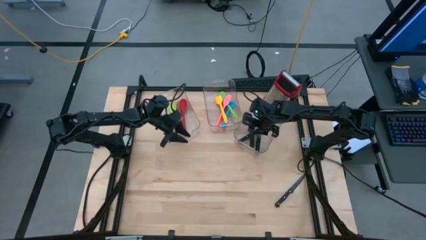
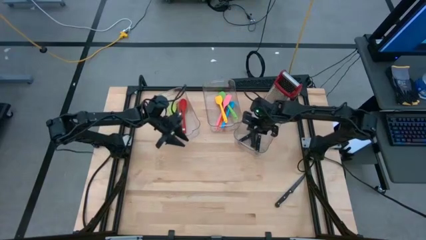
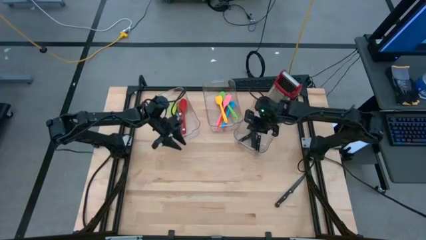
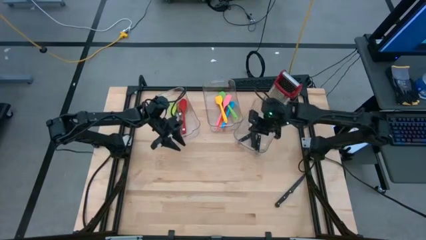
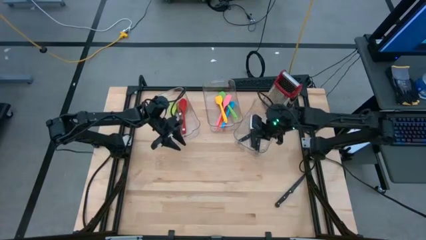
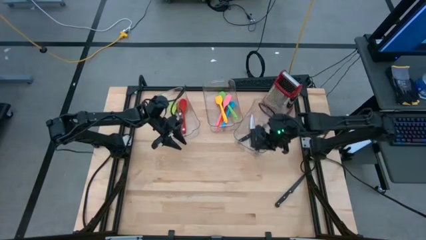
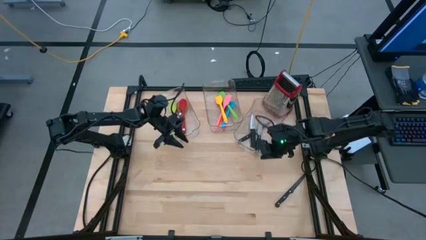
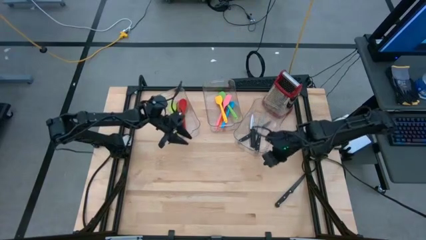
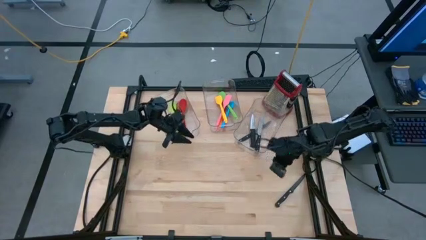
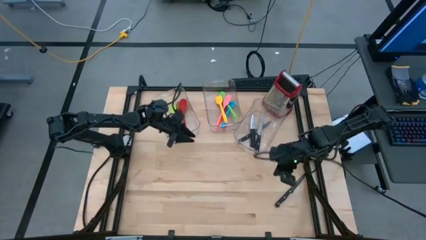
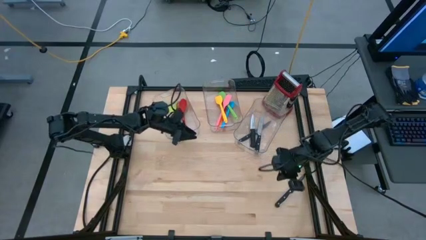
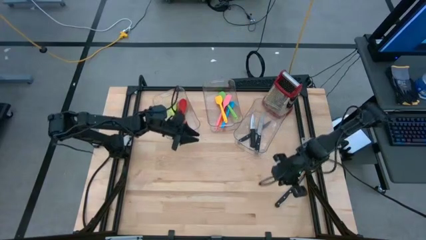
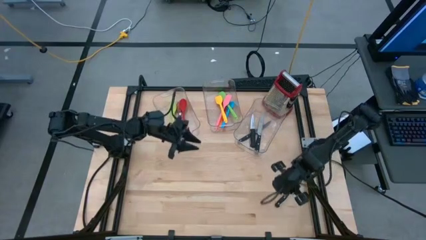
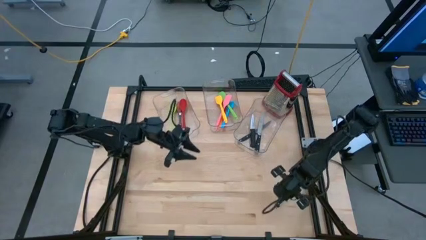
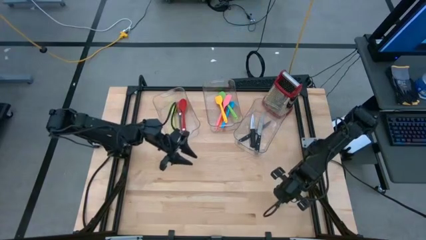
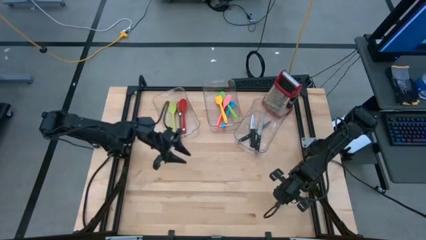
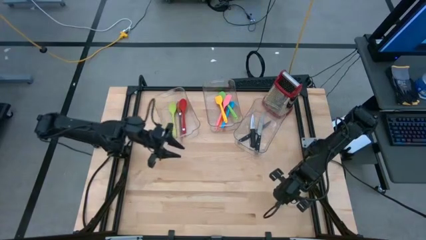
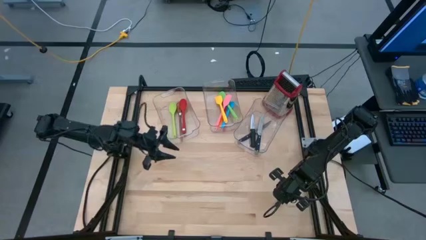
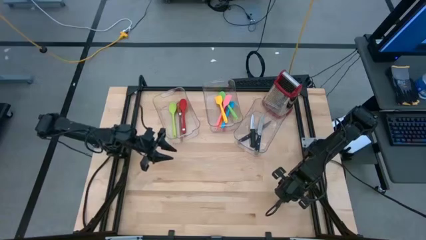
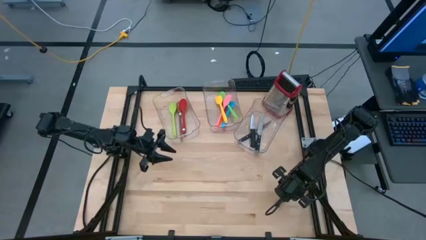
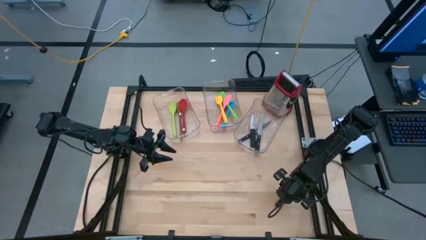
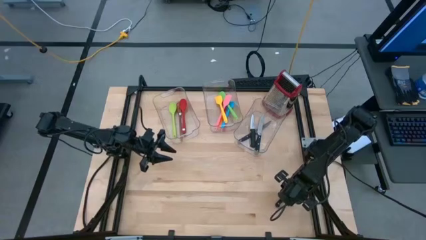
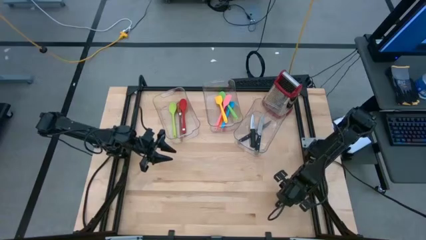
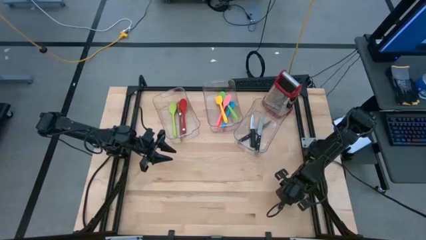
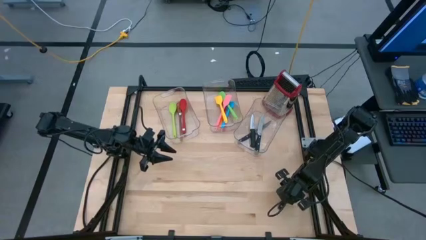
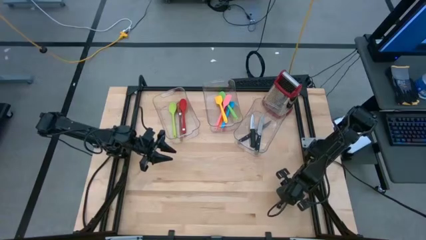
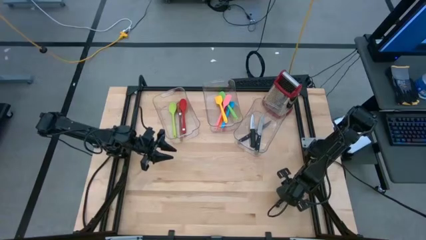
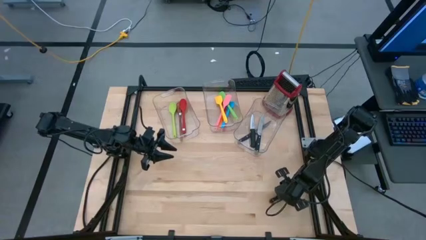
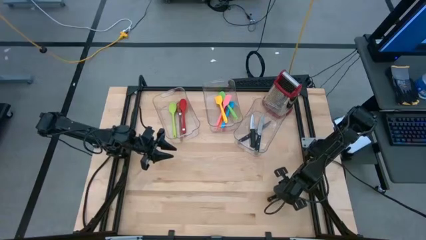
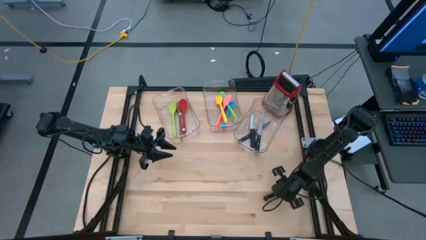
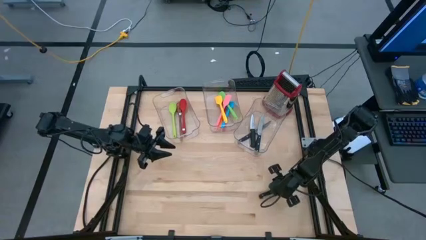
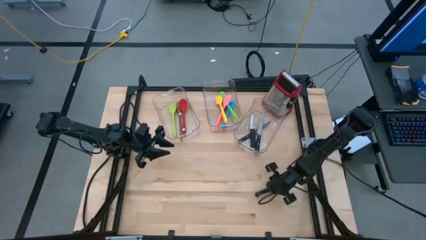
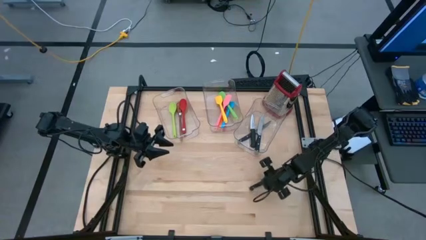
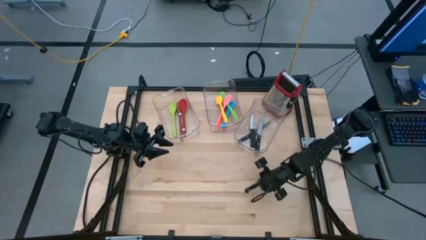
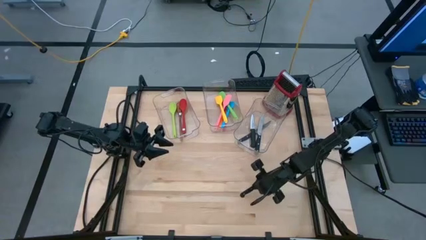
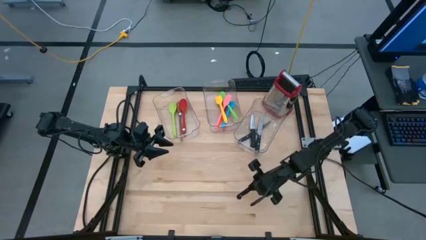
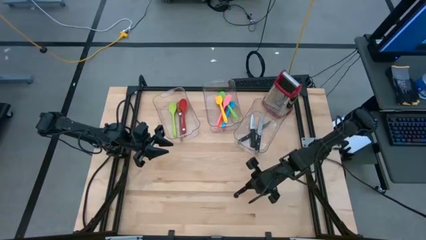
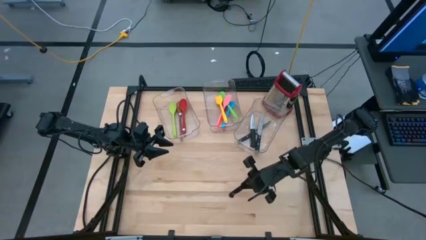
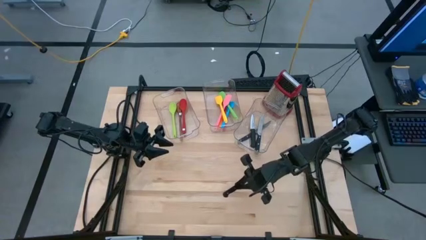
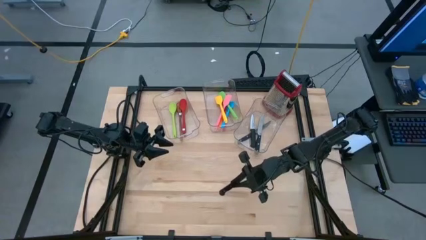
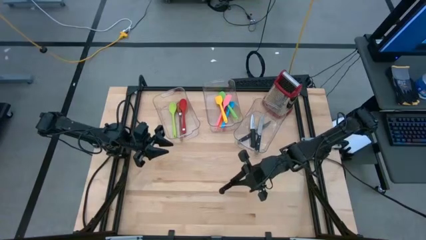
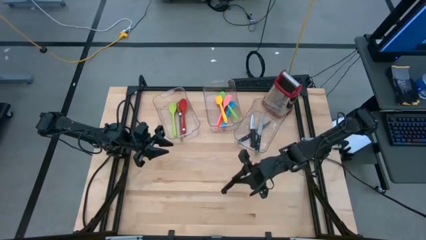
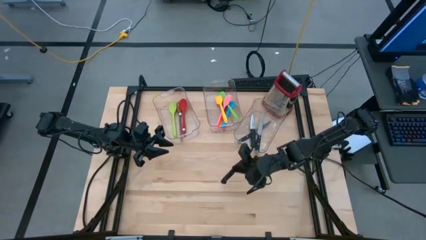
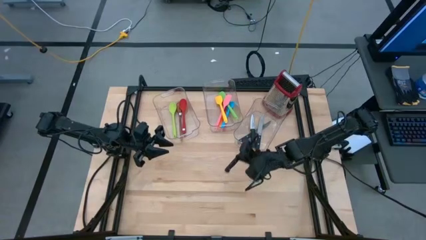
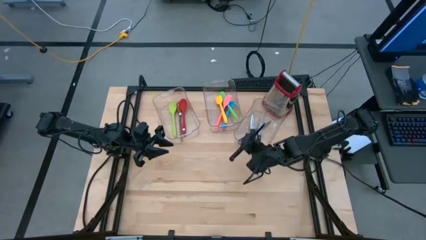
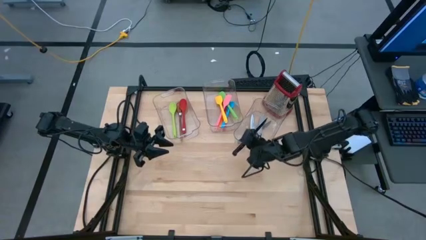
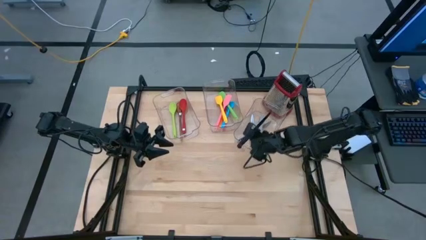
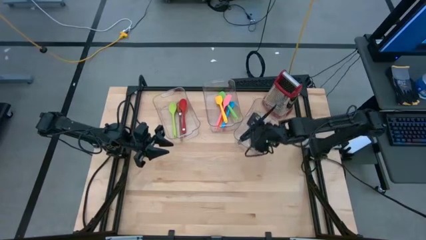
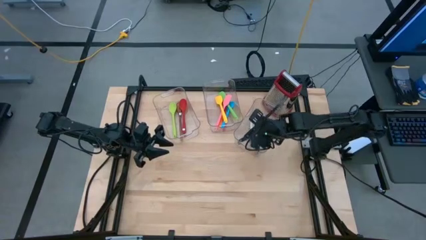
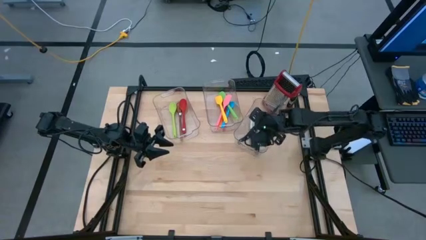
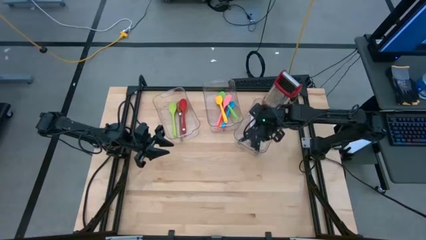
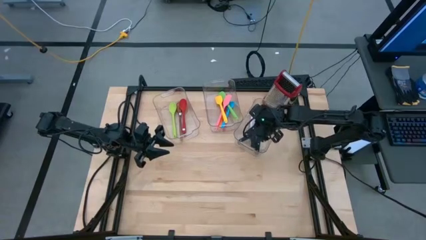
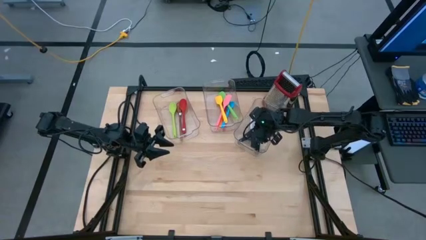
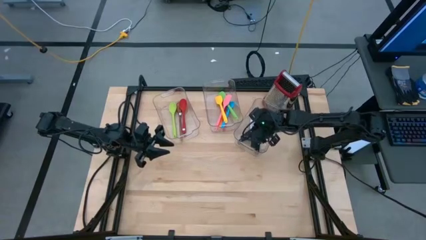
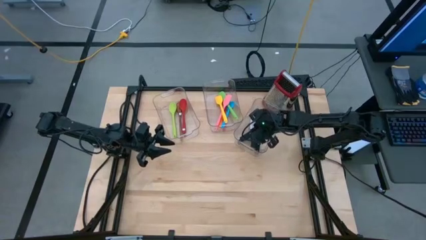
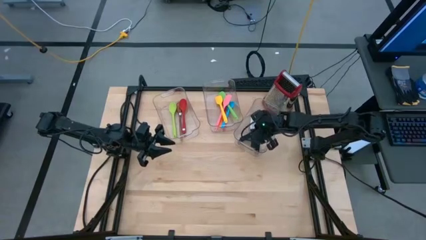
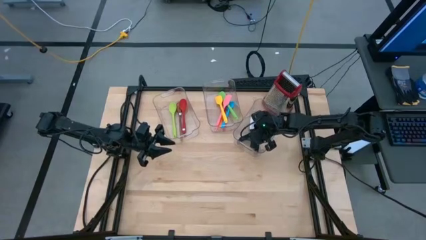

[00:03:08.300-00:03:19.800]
Task: Pick & Place Kitchen Items
Put the black kitchen knife in the right bin

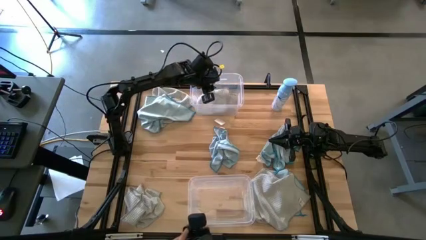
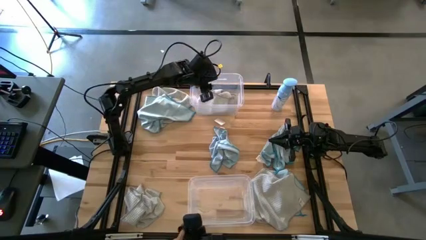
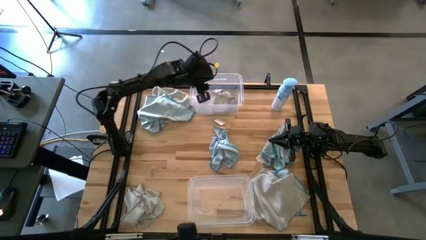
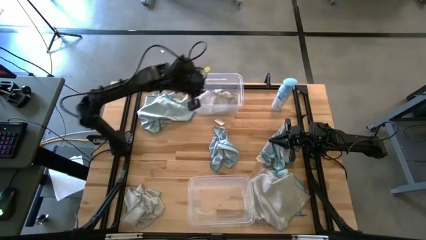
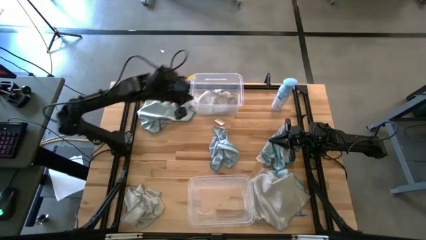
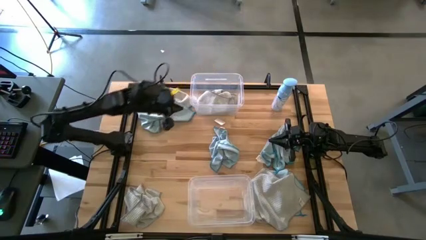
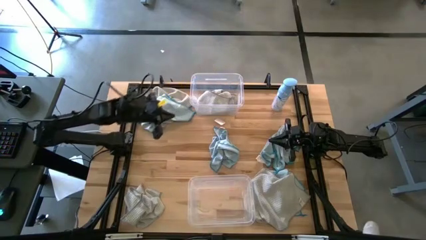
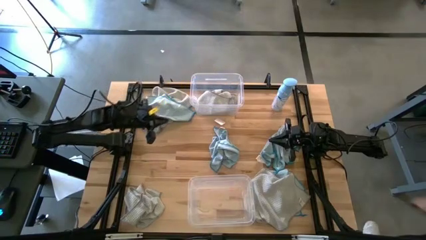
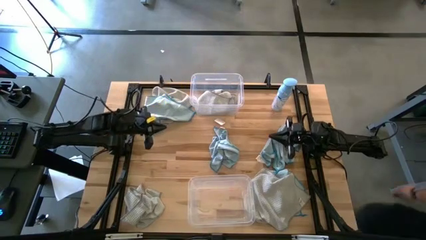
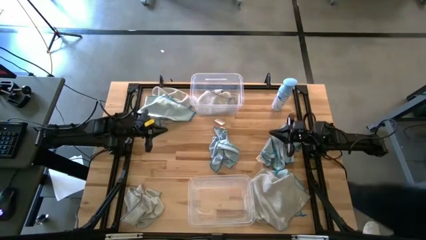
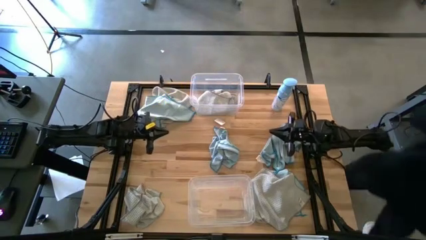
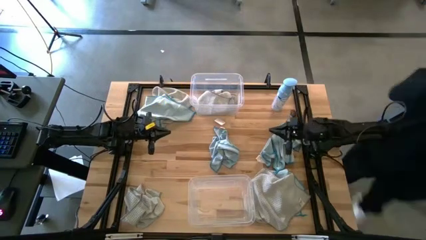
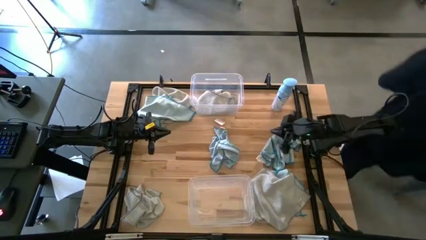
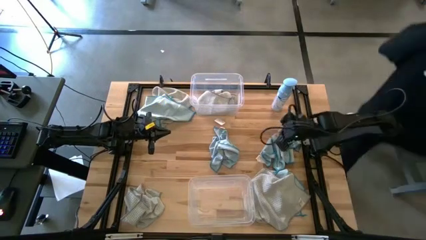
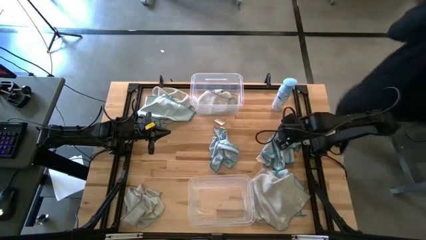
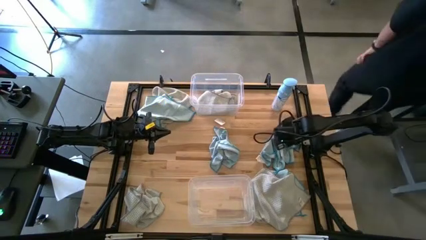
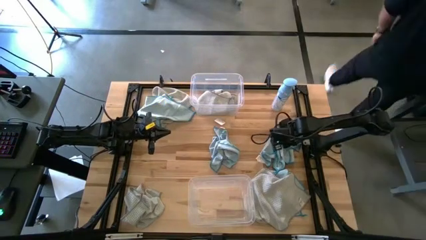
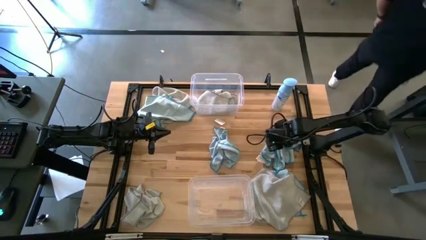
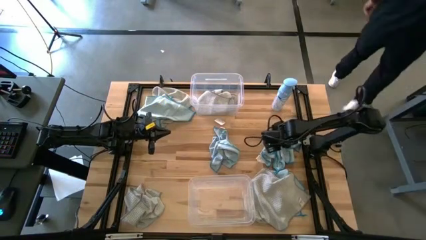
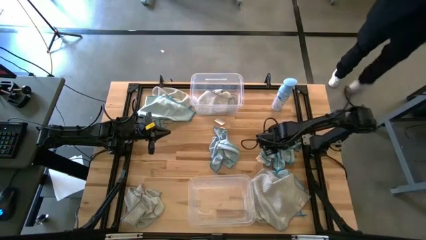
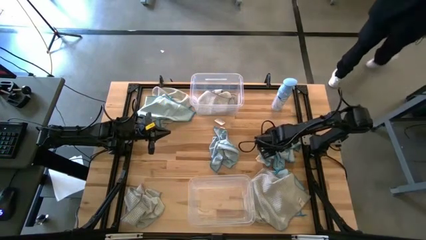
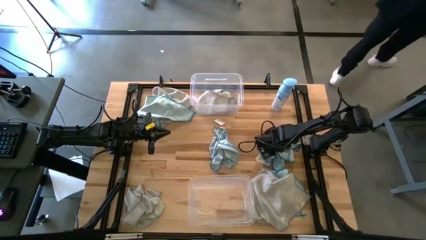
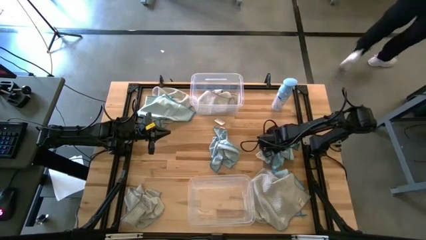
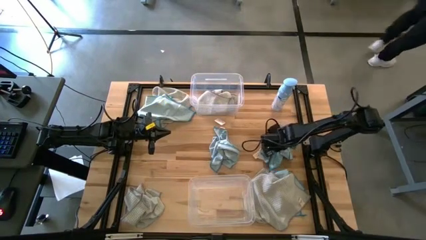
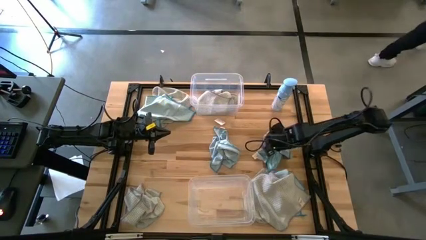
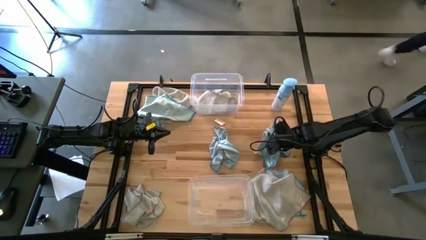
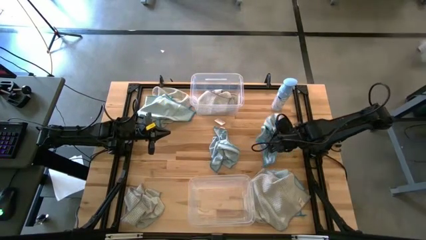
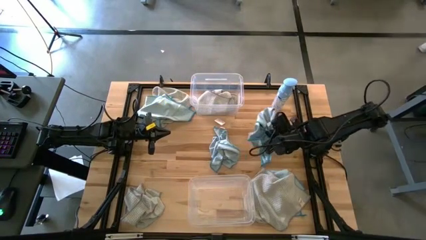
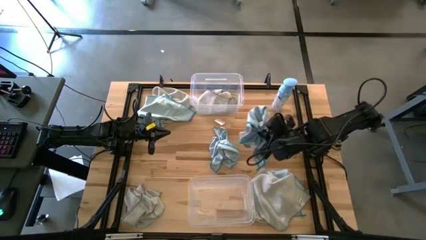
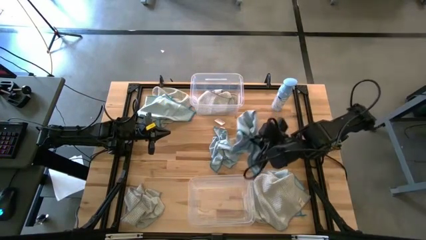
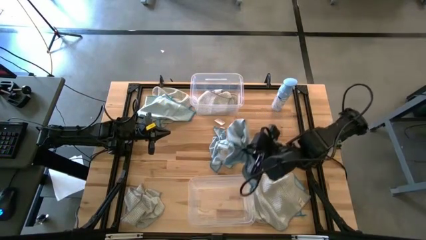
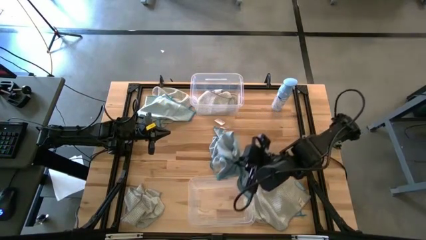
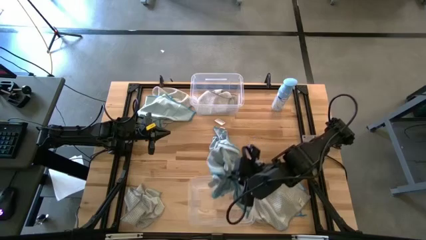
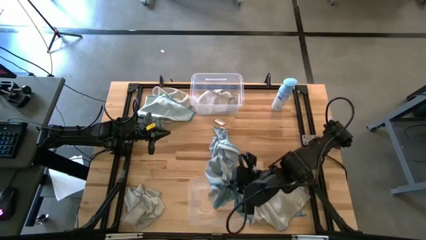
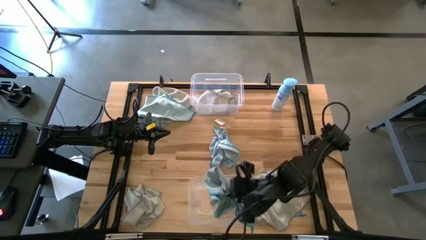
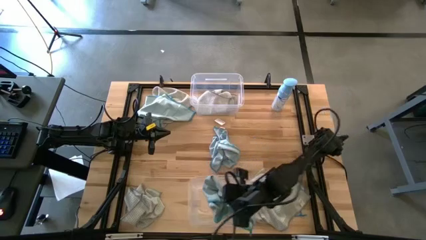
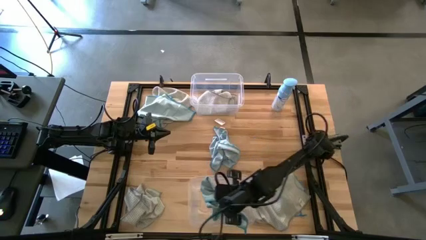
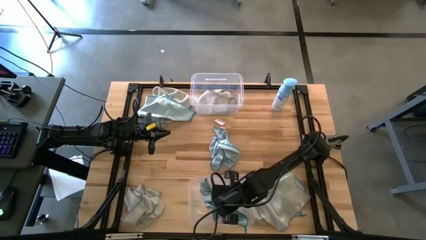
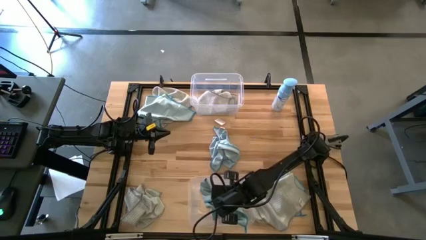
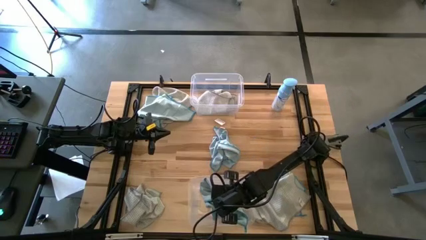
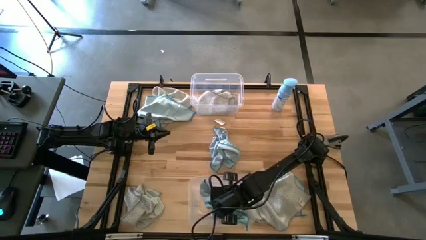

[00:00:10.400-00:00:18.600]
Task: Sort microfiber towel by color & place in baskets
Put the middle right blue towel into the bottom transparent bin
